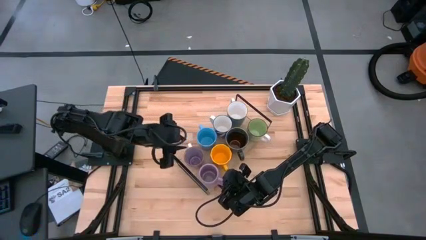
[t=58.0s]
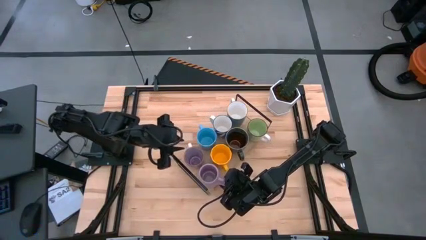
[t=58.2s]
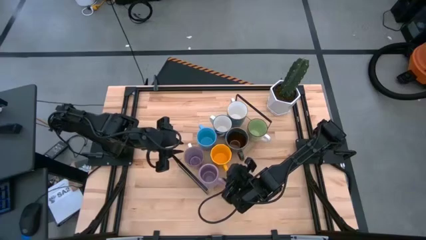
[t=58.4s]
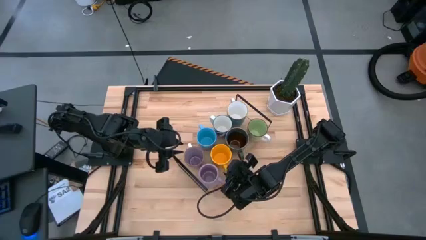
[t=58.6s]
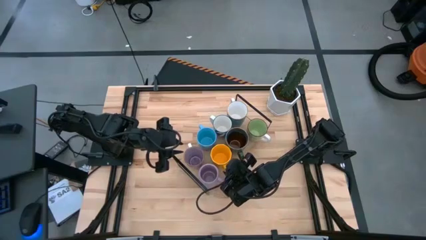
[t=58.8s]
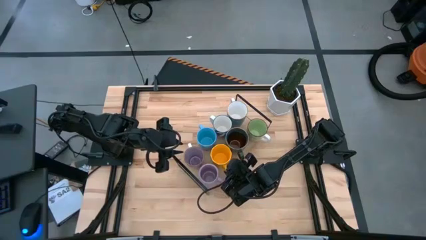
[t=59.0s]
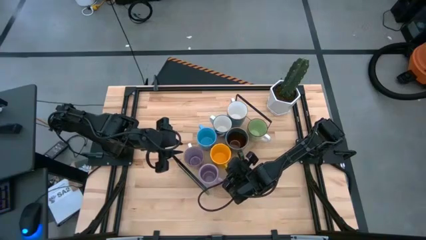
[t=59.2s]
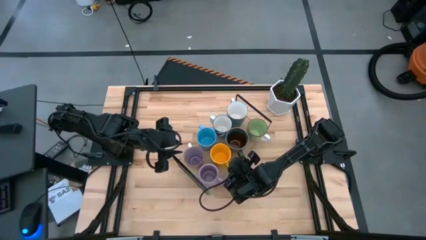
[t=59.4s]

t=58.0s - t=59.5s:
Task: Place coffee mugs
Adjust the yellow cup

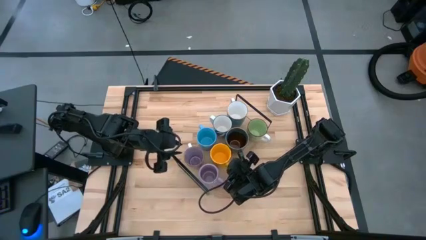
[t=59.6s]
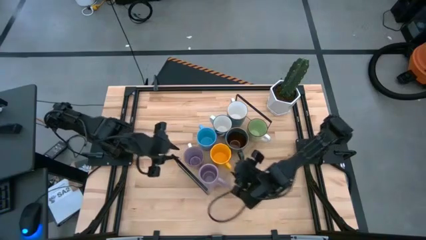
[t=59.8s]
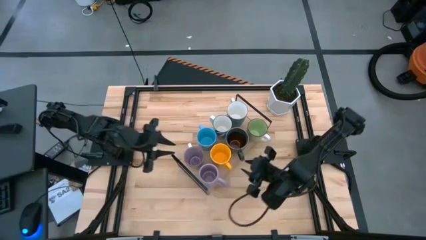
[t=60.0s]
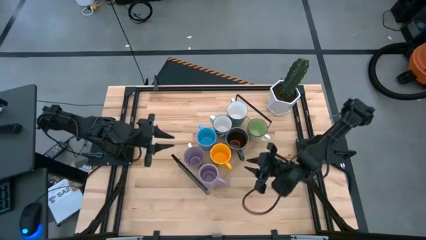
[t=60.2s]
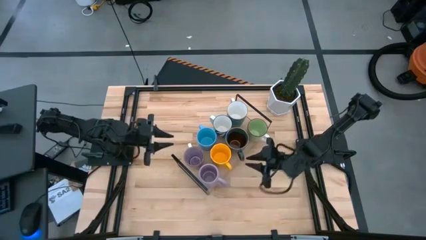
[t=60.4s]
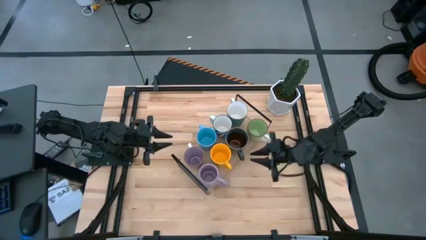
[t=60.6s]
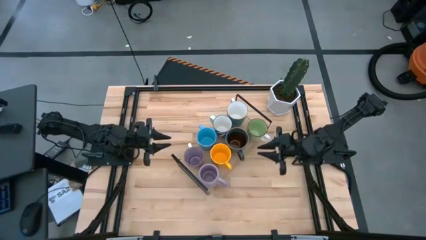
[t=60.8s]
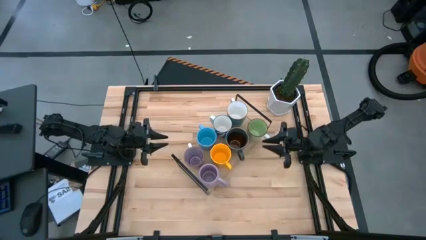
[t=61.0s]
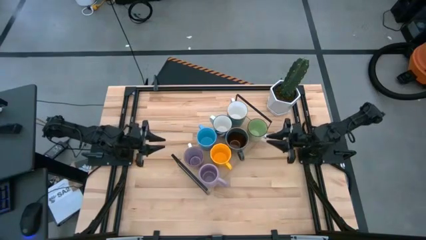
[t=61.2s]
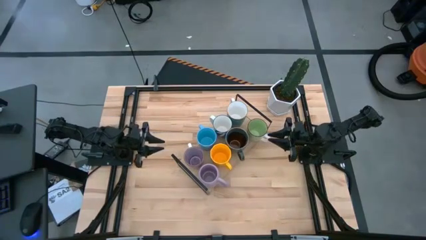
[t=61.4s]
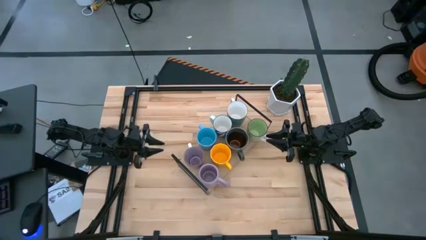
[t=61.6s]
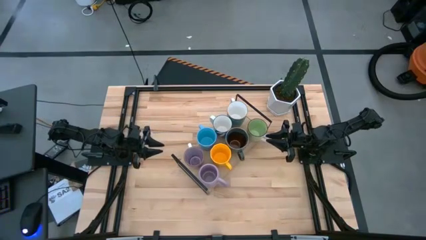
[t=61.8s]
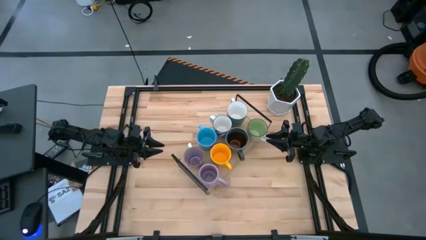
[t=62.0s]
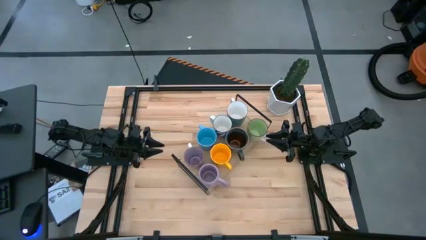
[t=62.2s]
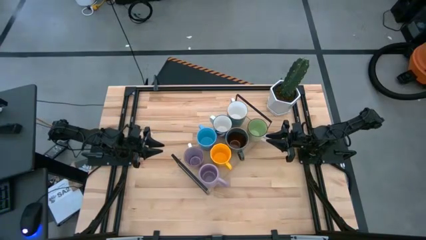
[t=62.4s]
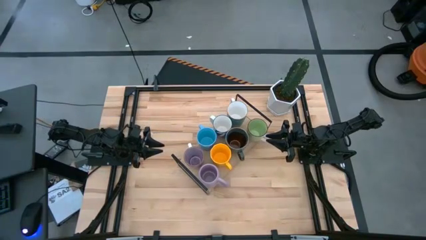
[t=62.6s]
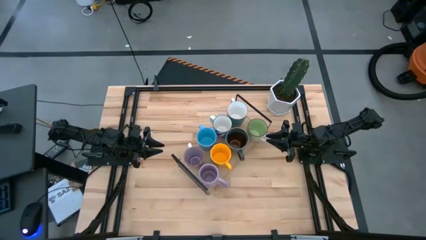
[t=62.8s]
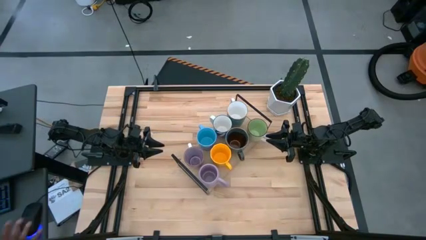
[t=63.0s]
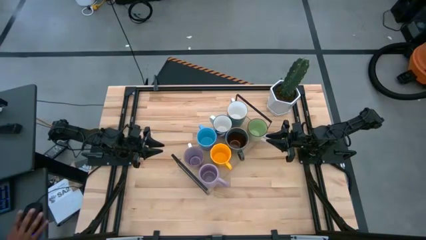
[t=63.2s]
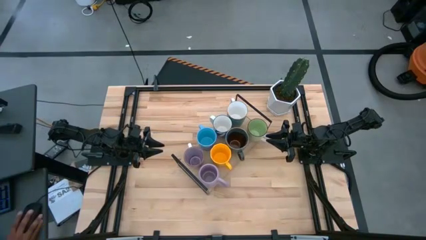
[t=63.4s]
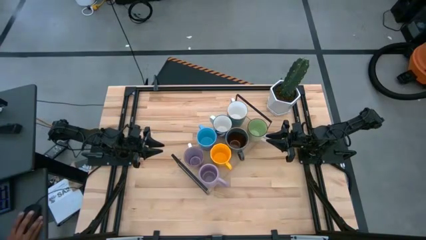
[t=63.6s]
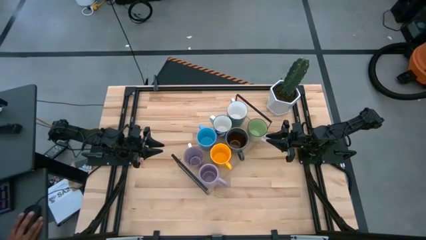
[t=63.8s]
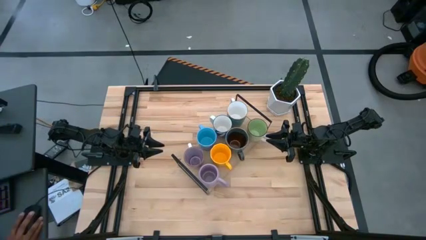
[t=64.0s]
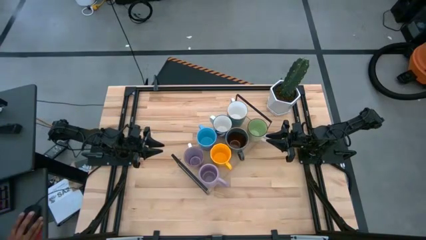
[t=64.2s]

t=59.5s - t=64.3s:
Return to home position

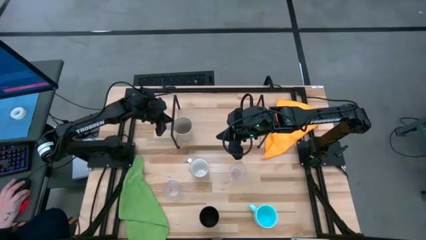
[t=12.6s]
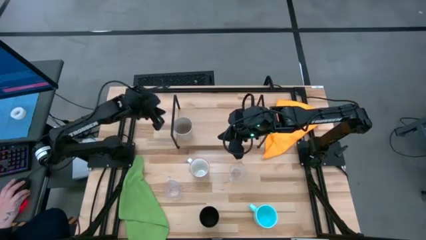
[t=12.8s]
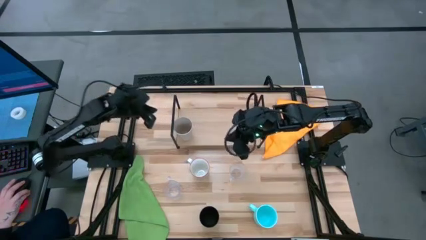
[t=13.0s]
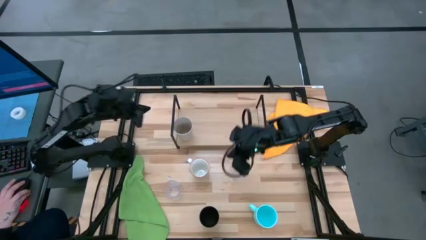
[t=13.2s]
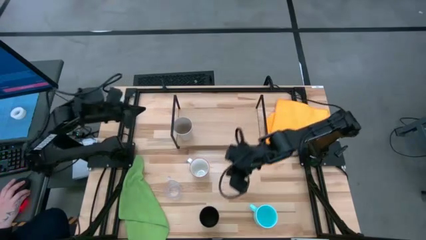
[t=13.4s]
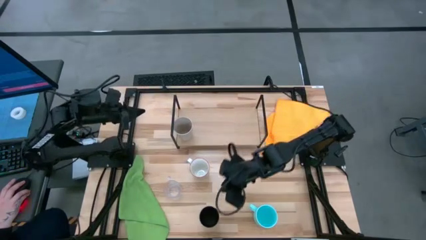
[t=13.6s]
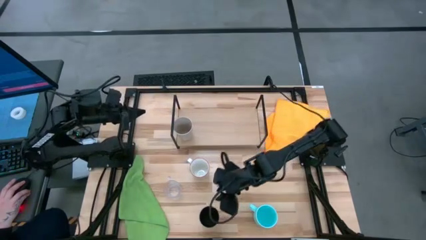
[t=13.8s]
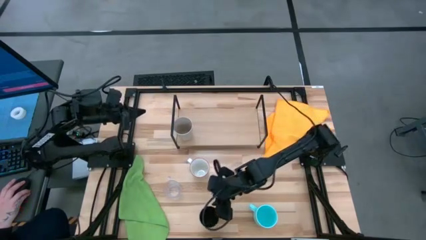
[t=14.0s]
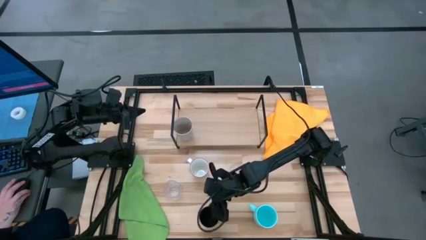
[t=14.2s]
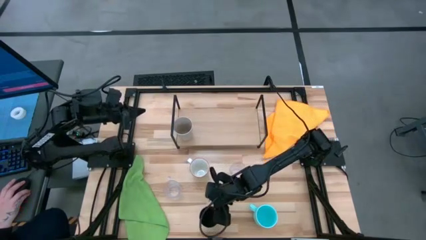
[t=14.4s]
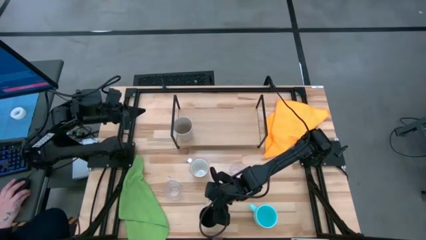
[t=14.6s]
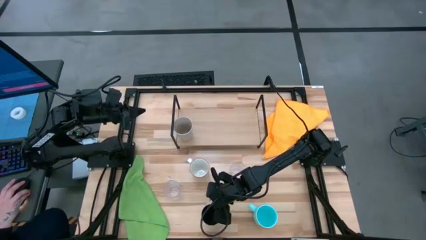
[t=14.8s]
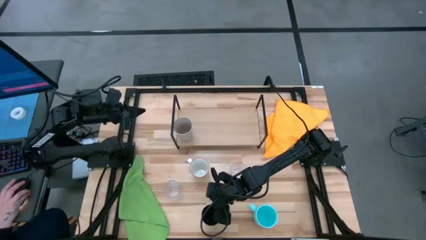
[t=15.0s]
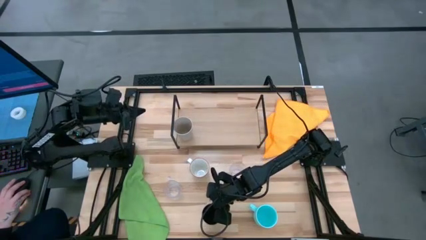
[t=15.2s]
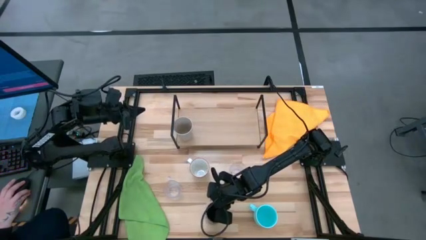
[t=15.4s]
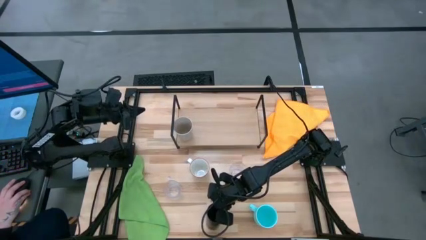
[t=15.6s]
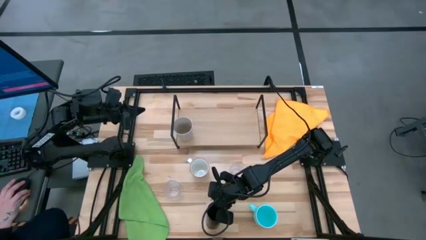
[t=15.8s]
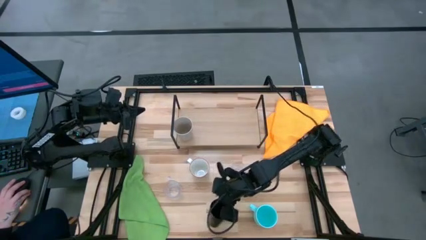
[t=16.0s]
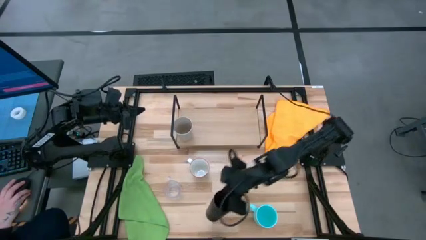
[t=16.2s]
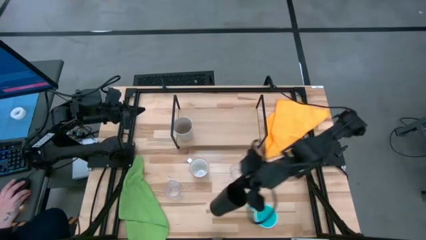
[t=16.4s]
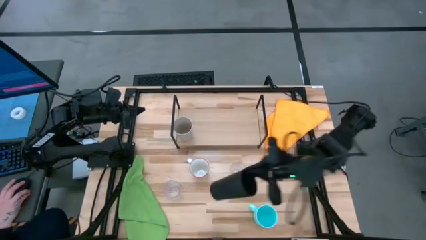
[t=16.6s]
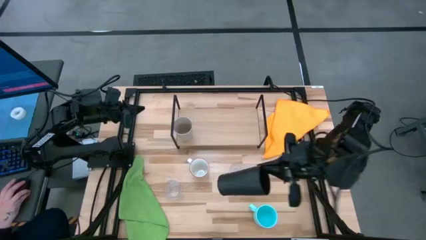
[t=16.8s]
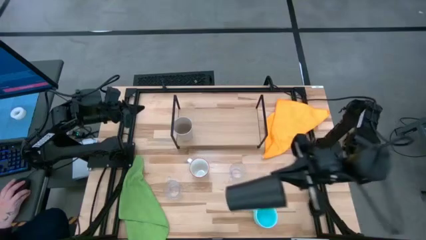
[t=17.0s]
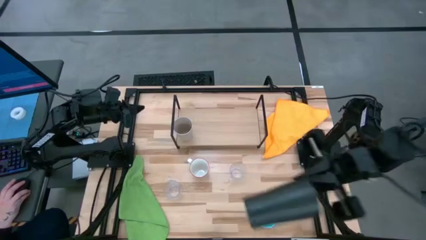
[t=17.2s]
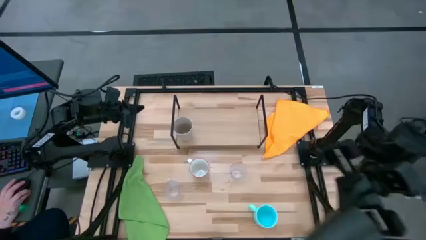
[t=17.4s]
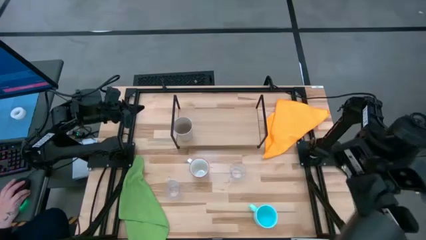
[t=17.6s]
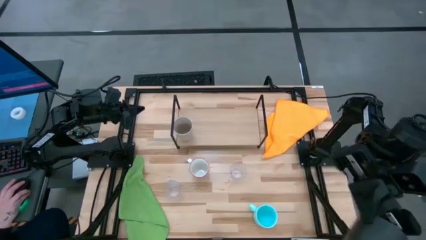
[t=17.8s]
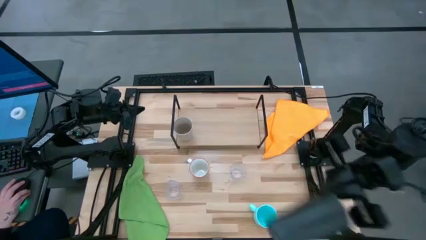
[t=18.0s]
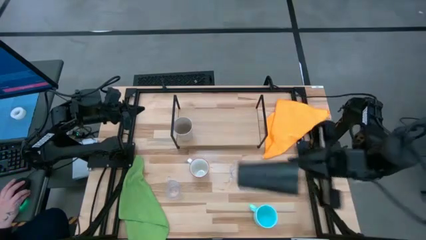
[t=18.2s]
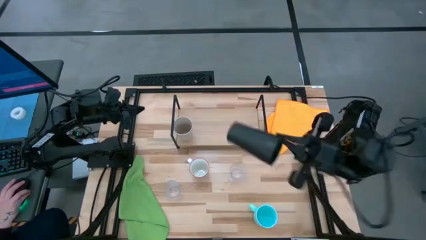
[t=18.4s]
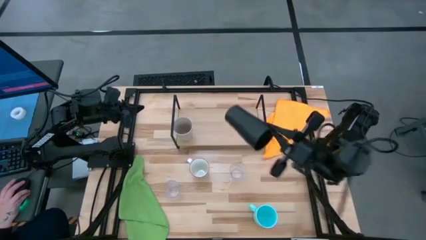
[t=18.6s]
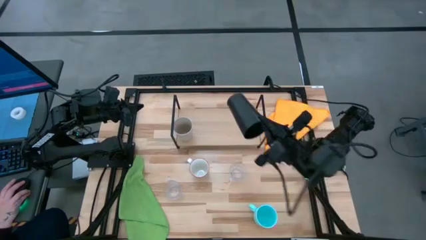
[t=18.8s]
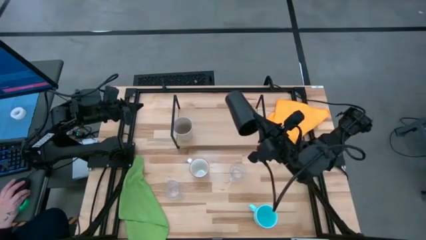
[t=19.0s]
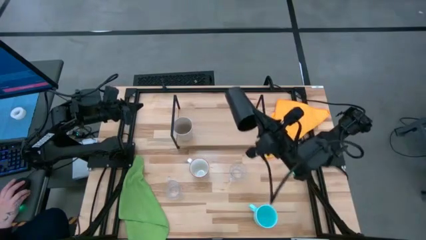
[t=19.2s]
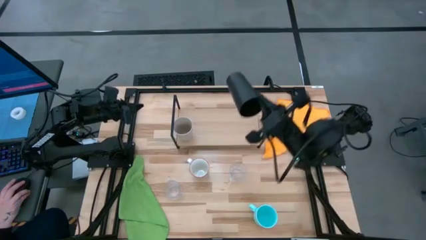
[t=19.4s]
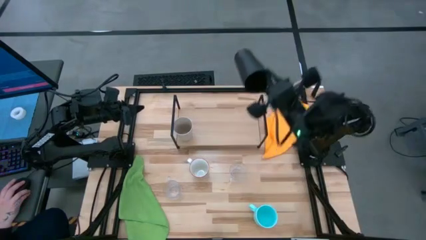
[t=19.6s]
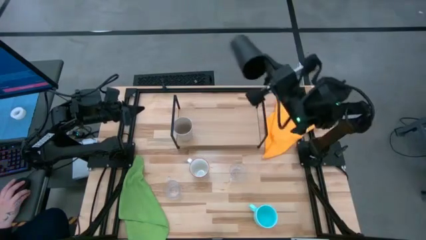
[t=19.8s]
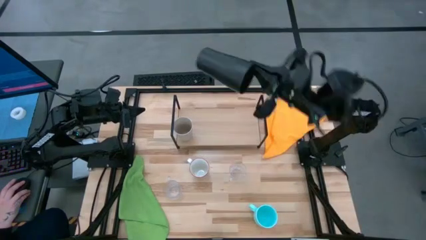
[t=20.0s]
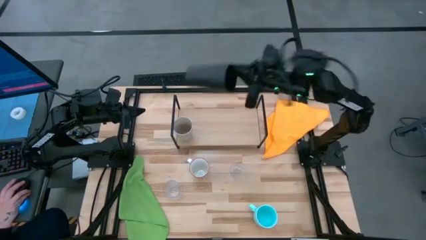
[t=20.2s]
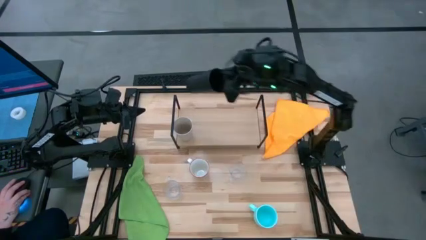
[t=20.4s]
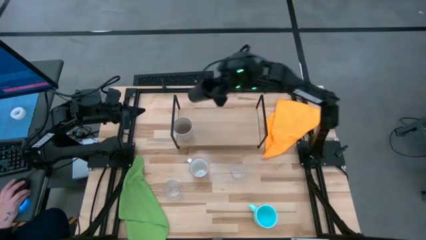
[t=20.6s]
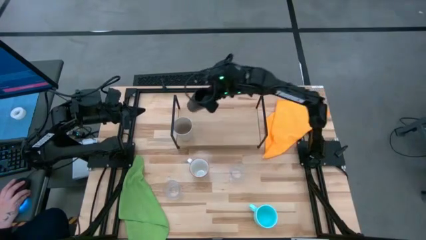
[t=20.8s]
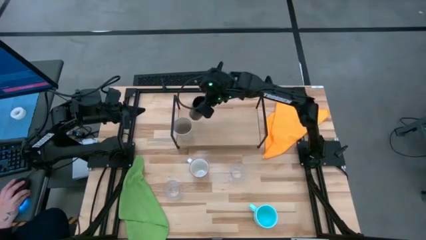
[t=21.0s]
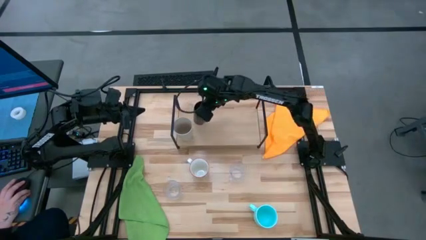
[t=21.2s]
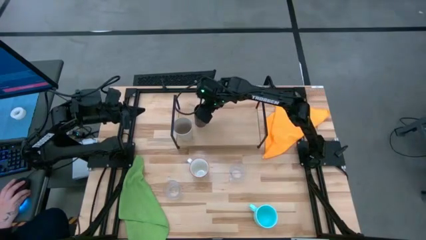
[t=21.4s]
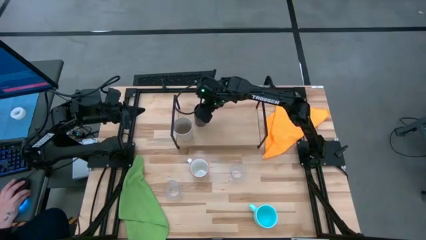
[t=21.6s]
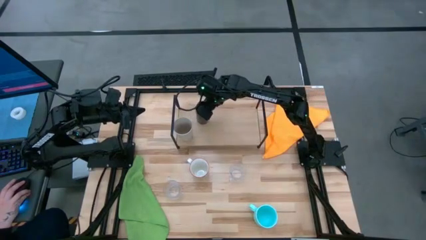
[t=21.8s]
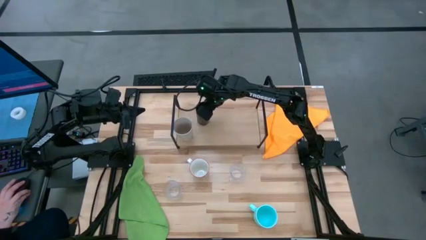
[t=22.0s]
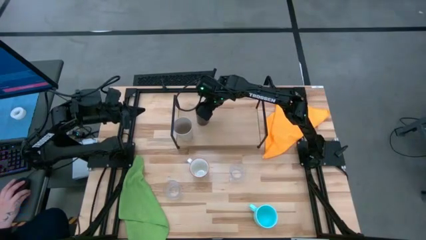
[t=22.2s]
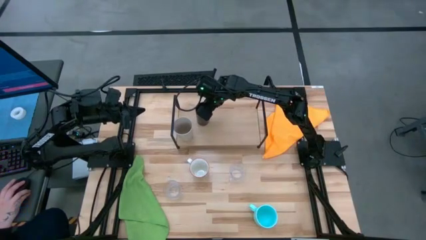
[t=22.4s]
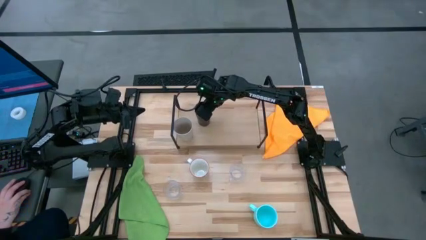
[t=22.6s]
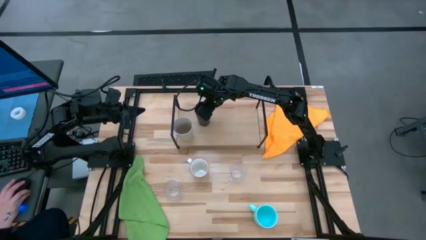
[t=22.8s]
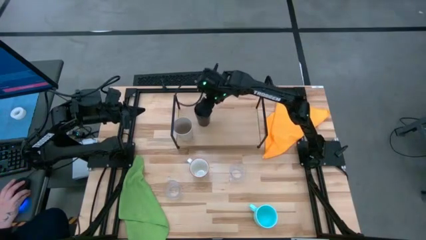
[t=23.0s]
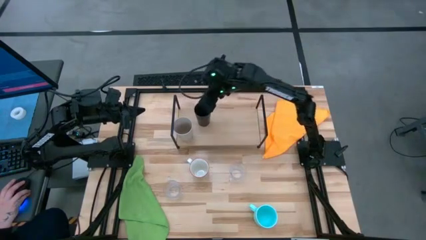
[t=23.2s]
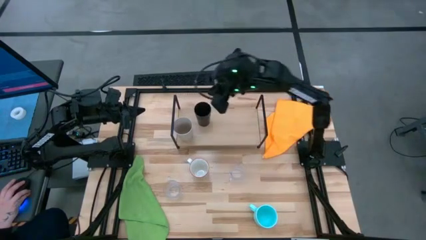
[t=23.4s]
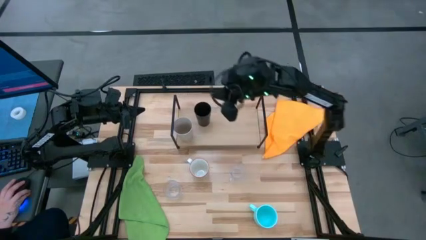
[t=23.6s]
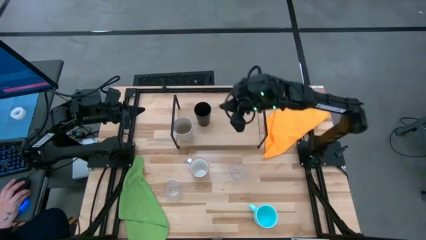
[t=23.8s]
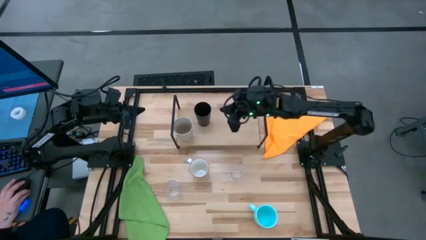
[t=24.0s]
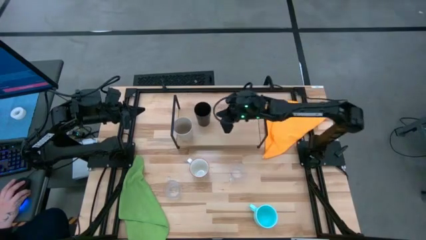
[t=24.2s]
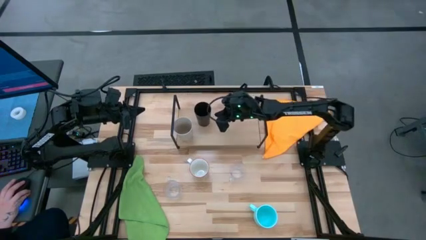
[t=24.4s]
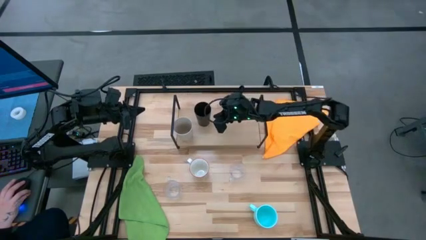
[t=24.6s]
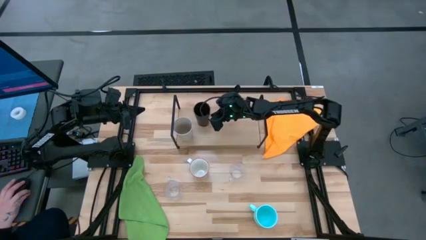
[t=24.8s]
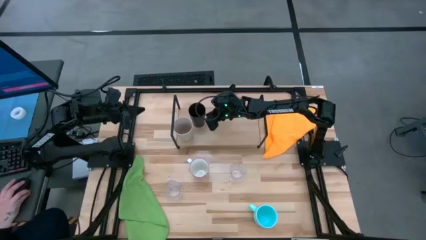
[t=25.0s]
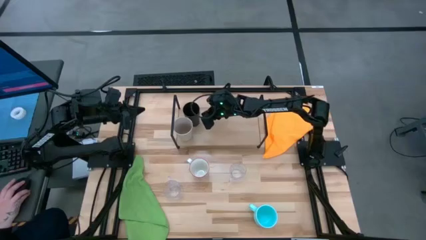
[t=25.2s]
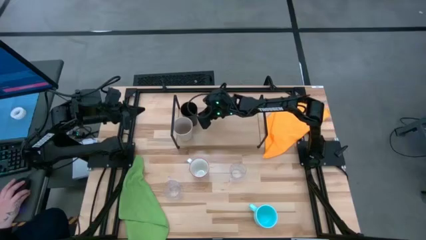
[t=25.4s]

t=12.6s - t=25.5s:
Task: Stack small to large cups/mugs on shelf
Put the black cup on the shelf
